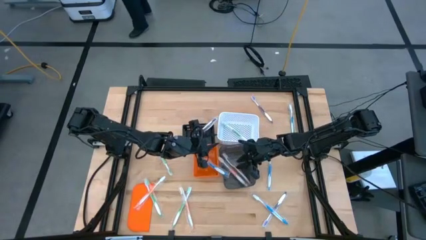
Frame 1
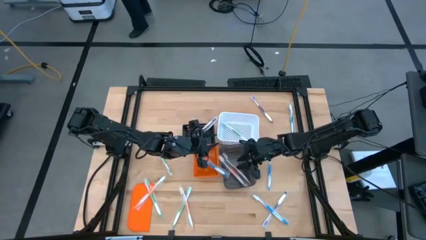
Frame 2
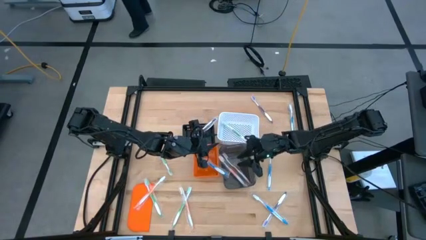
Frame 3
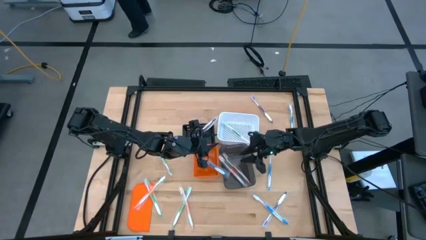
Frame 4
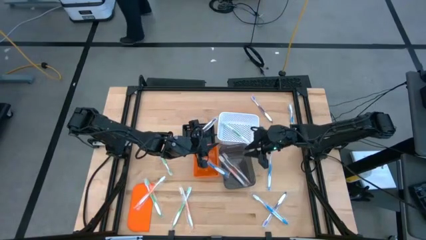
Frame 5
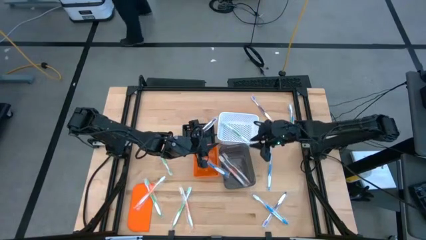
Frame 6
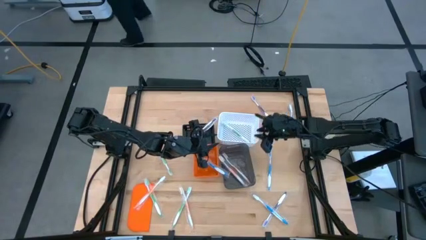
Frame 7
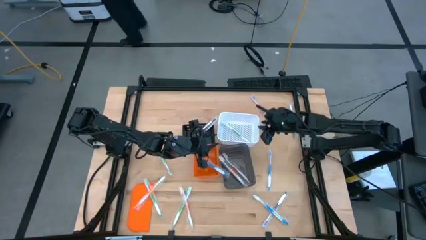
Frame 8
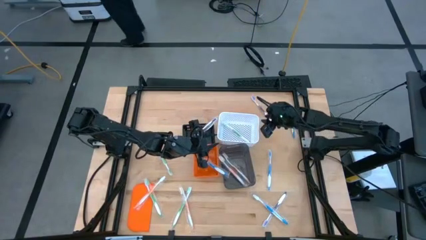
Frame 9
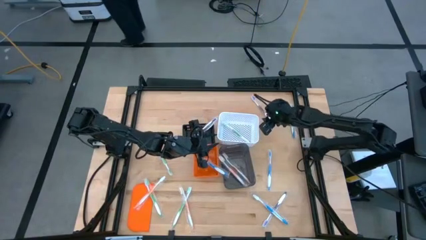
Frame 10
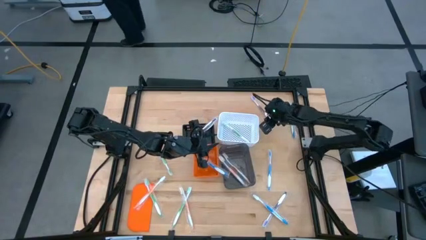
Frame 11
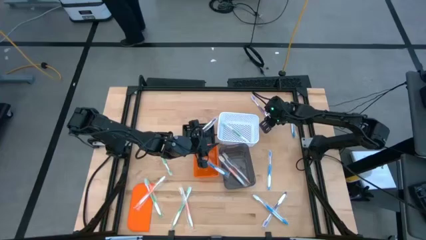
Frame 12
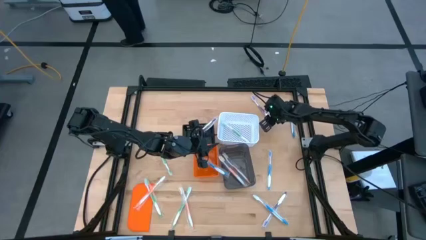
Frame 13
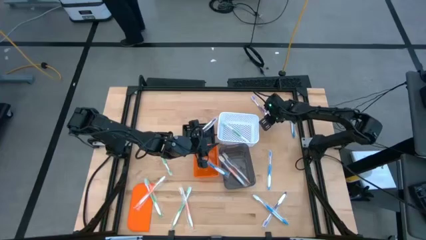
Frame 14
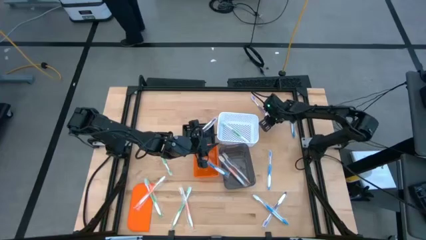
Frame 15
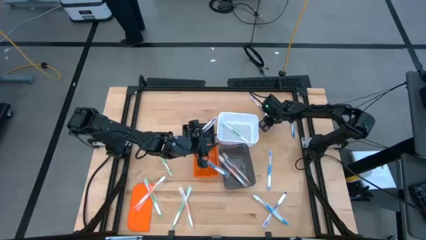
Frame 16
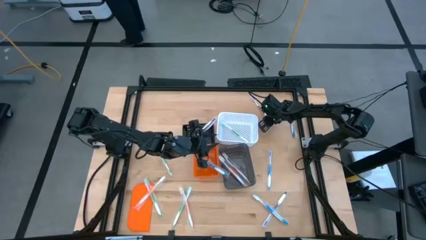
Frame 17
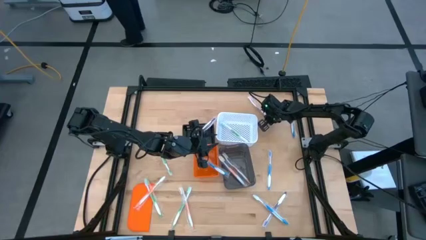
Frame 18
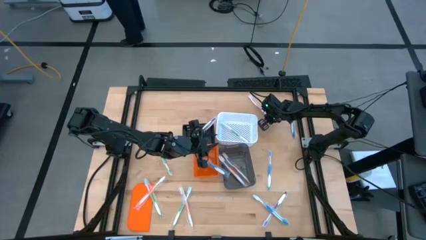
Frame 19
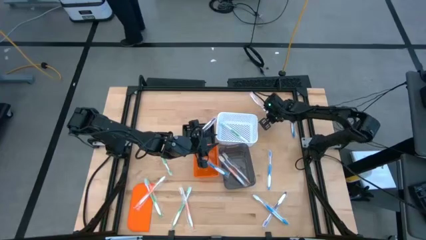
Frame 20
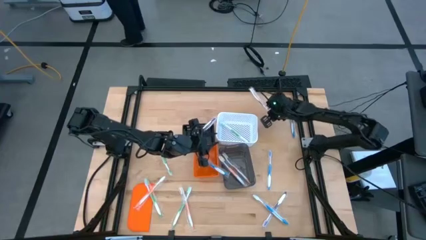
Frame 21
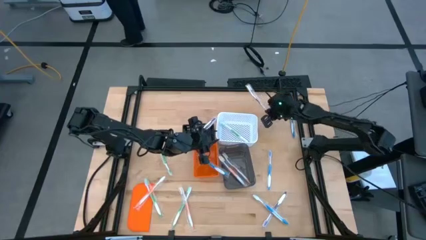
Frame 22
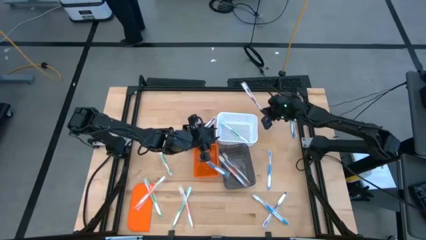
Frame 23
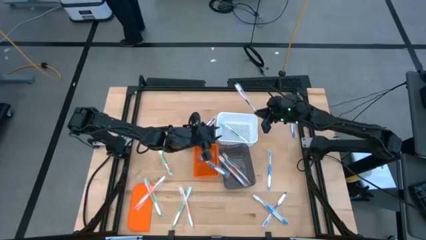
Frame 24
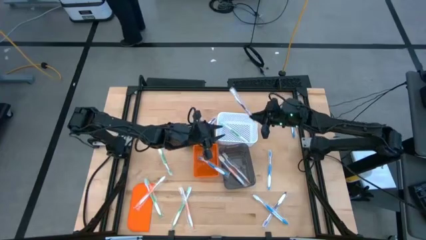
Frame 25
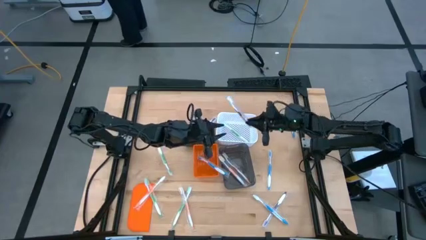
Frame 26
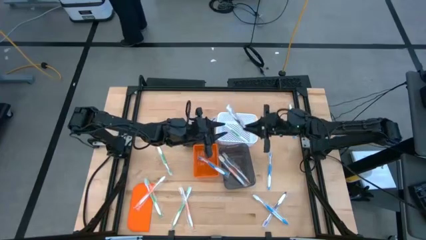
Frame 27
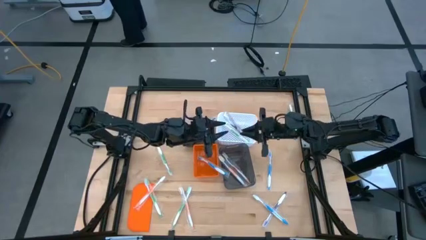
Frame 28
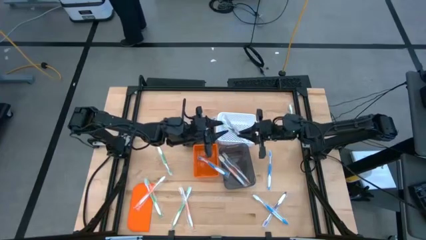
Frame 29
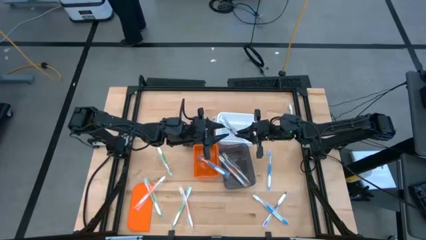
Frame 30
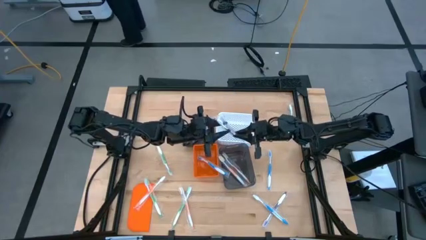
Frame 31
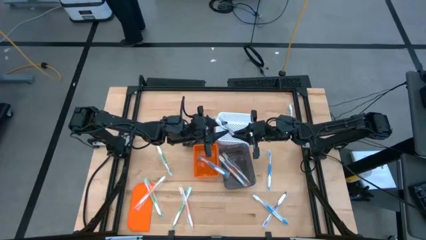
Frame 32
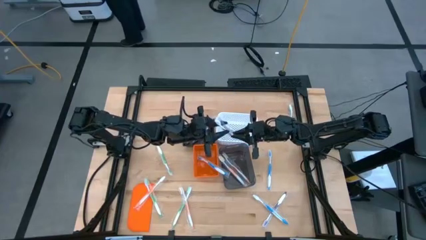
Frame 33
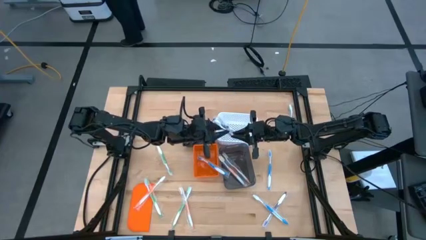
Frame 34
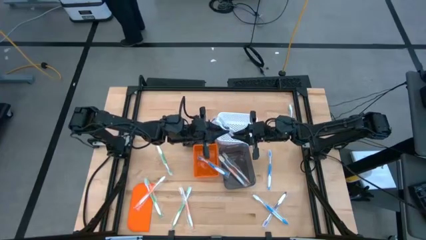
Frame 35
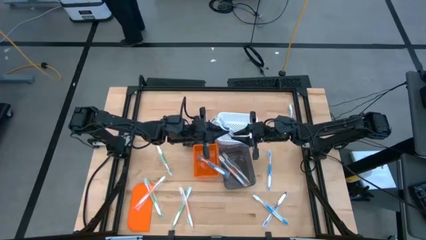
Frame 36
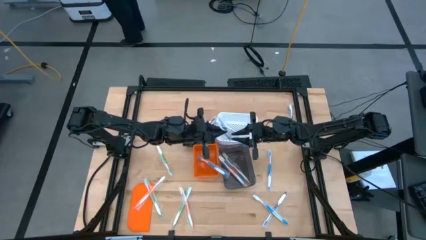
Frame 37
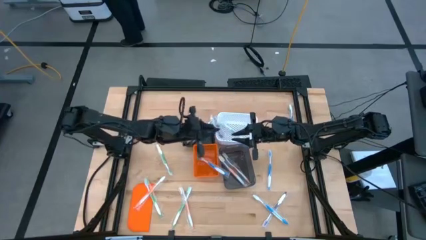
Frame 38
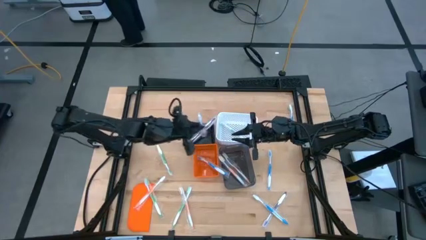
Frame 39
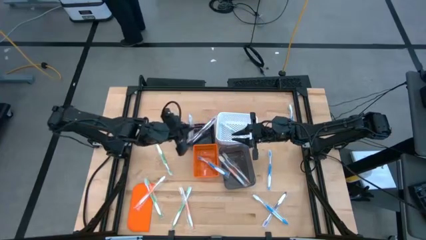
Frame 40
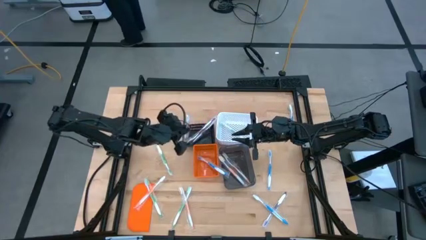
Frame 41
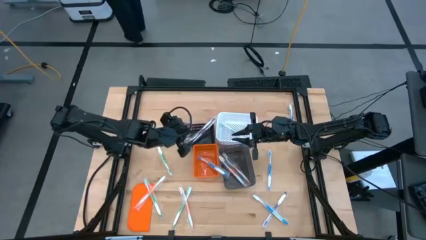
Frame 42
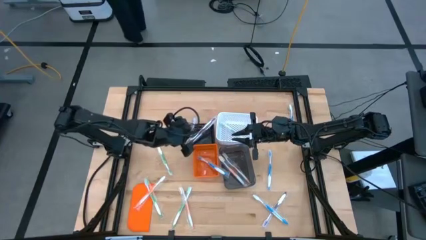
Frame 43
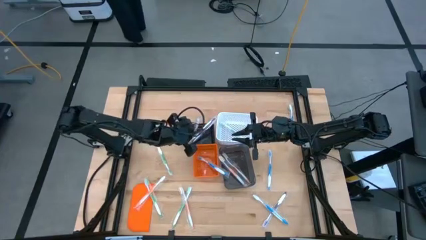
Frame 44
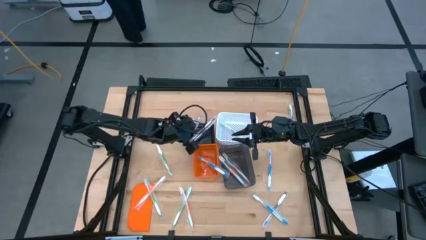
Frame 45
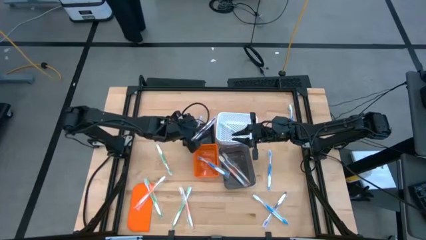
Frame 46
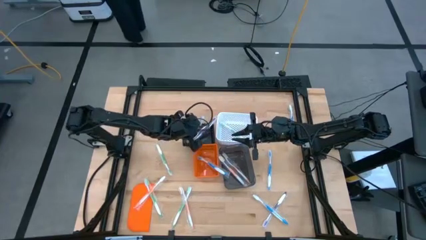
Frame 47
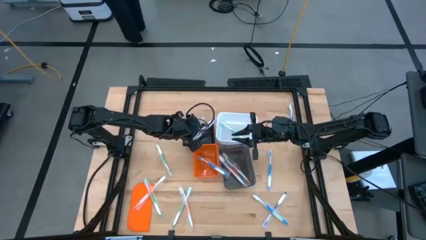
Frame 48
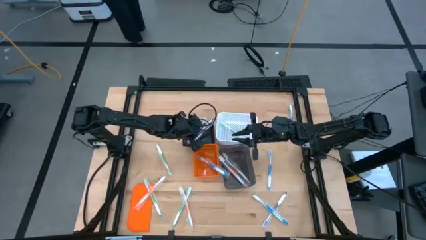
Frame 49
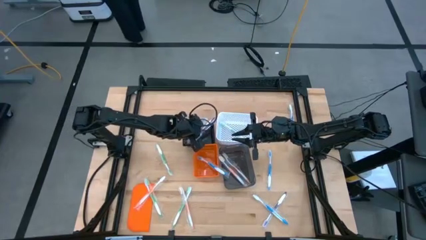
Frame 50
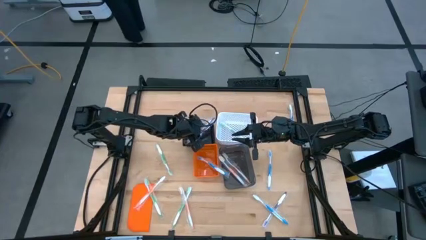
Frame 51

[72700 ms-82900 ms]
Task: Pick & Place Toothbrushes
Put the violet toothbrush into the black bin

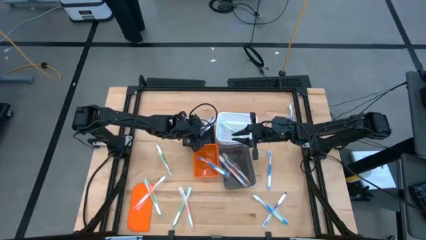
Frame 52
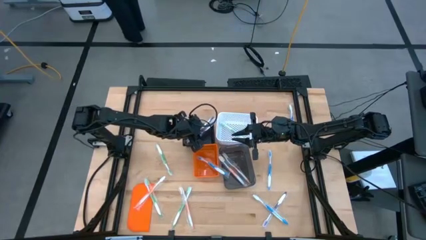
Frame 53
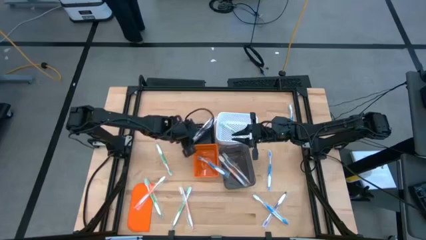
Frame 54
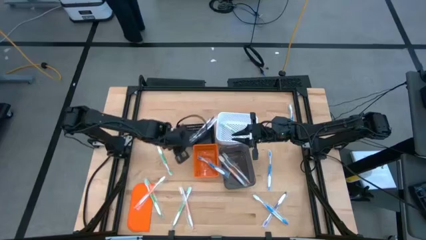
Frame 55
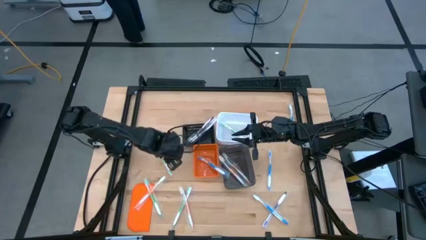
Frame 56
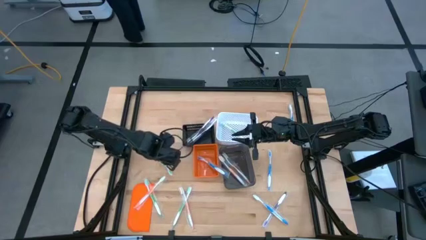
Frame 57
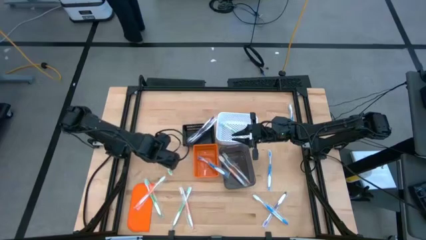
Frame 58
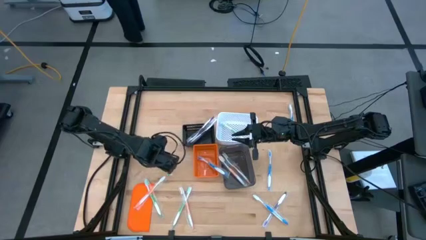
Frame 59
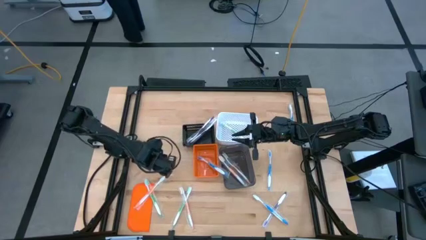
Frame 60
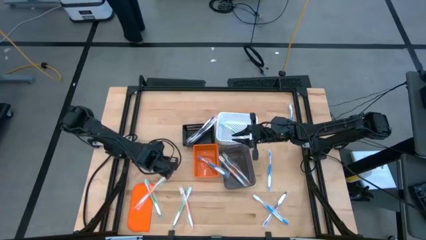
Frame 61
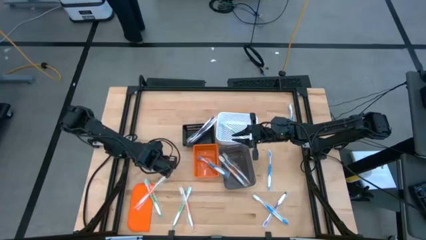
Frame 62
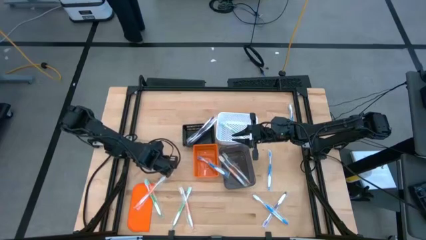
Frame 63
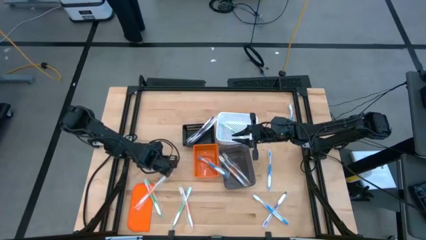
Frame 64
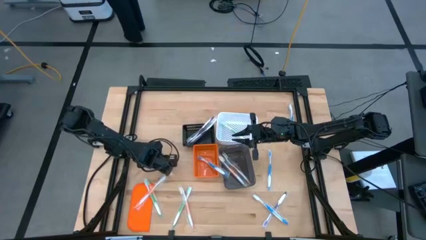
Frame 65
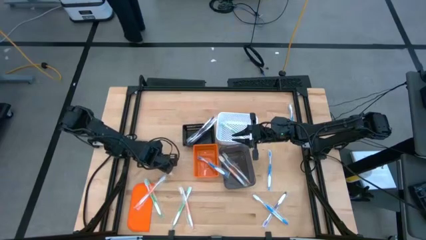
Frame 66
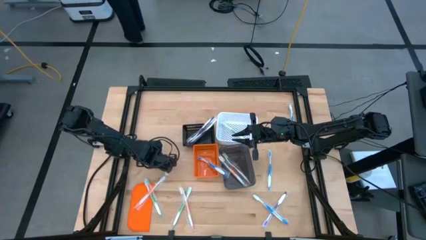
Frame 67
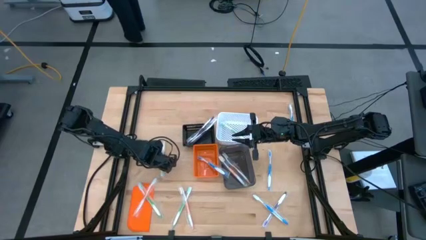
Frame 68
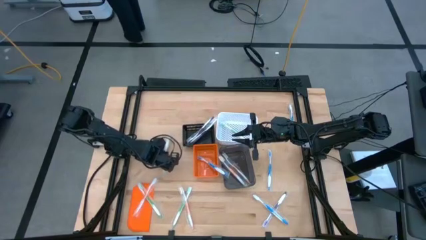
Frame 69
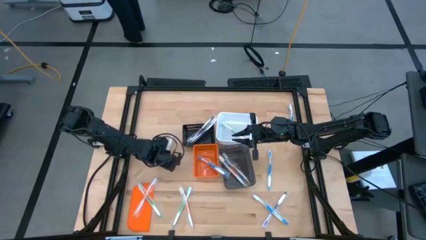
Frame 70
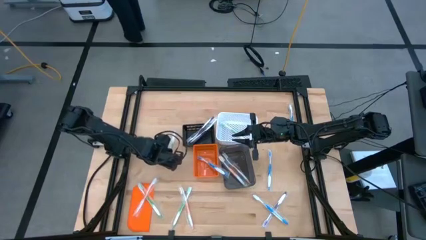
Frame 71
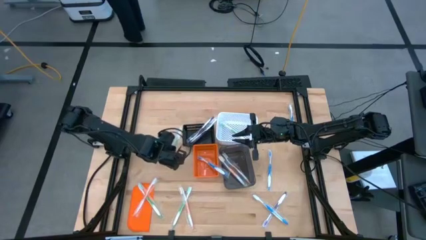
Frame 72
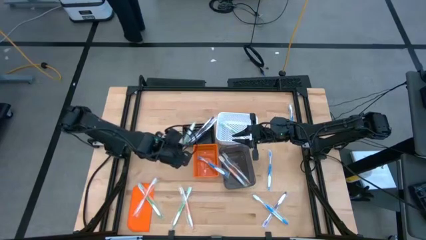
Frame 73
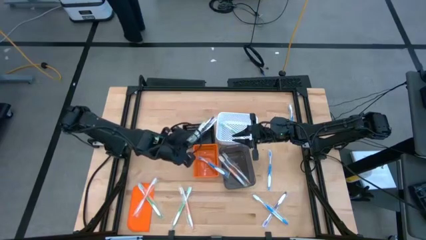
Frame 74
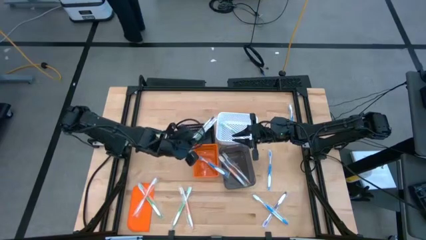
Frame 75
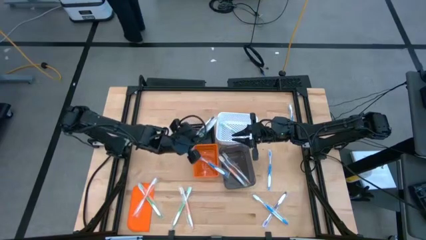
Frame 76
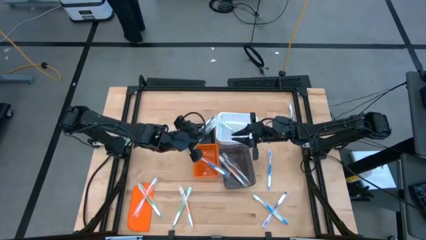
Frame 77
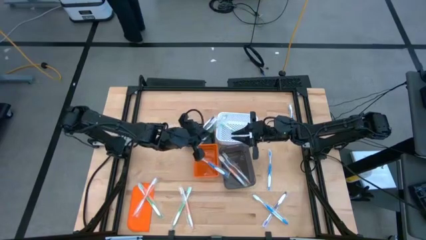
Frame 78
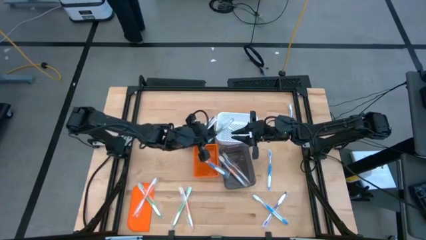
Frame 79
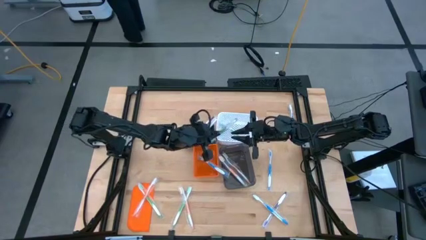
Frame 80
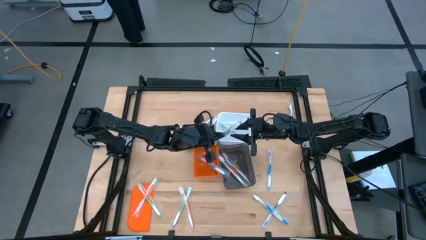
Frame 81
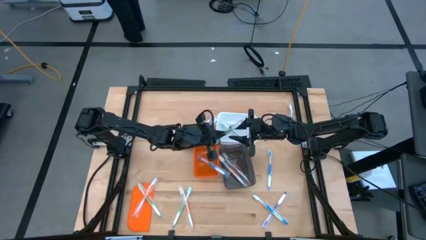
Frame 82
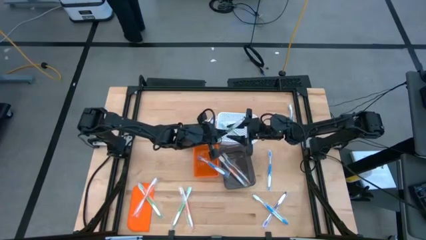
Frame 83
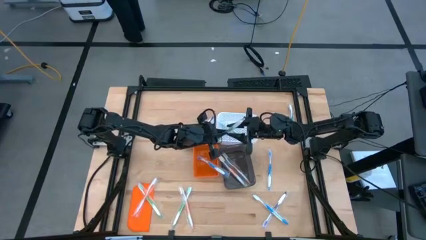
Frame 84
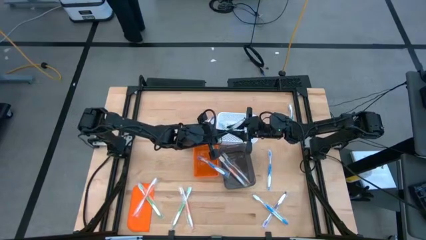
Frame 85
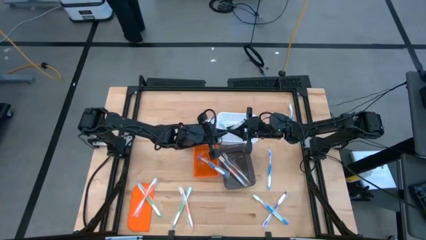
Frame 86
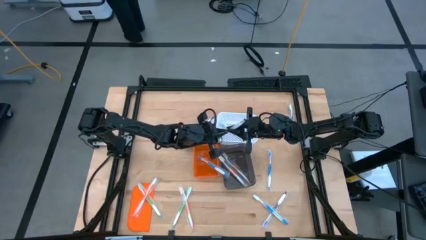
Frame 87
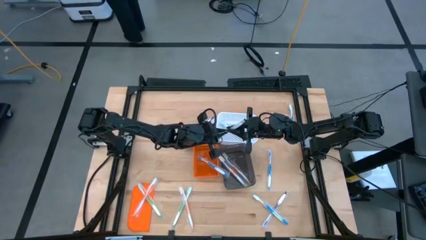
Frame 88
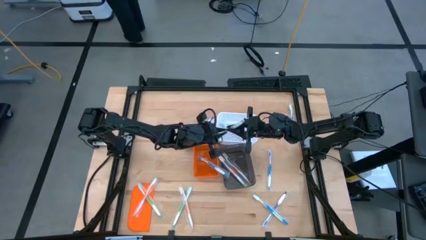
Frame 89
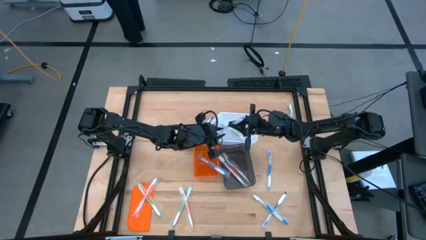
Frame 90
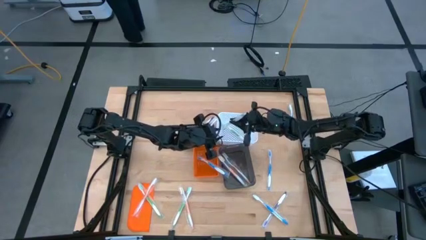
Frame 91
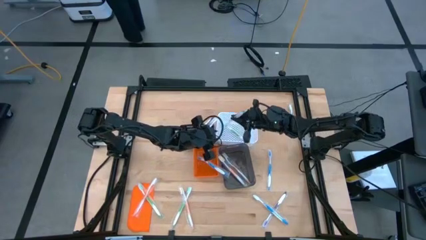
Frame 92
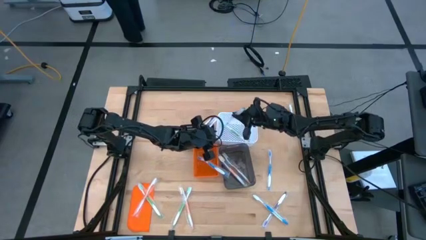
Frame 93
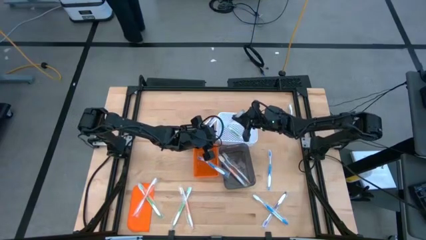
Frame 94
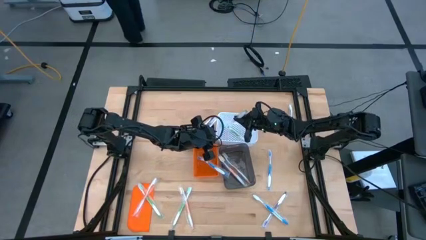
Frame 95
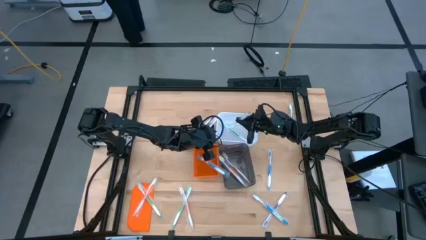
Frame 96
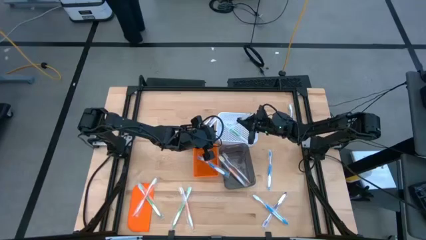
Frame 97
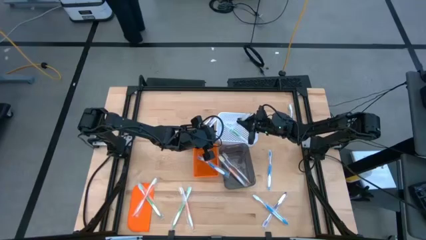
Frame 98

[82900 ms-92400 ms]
Put the green toothbrush into the white bin
